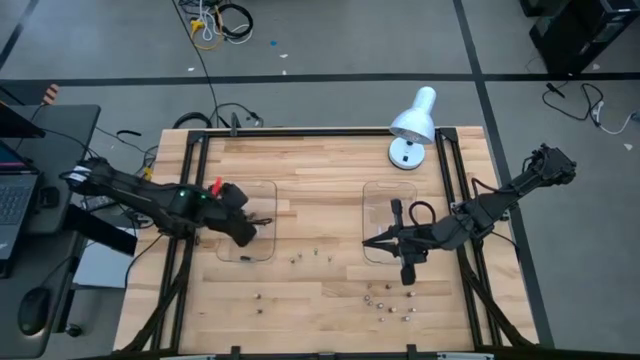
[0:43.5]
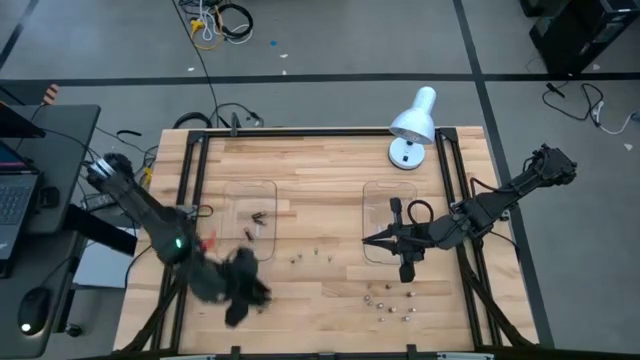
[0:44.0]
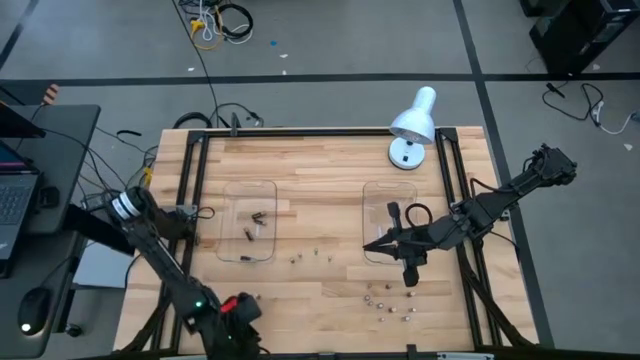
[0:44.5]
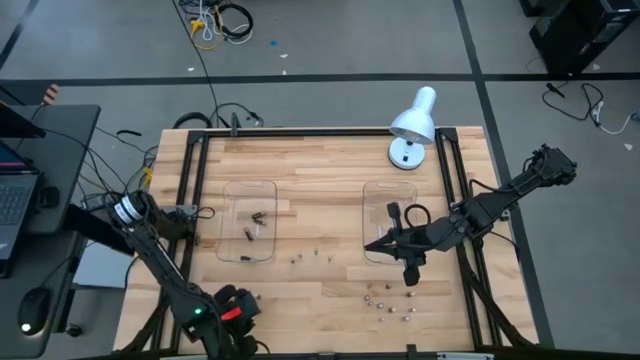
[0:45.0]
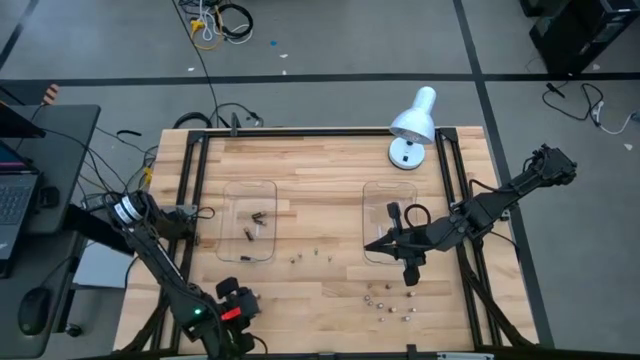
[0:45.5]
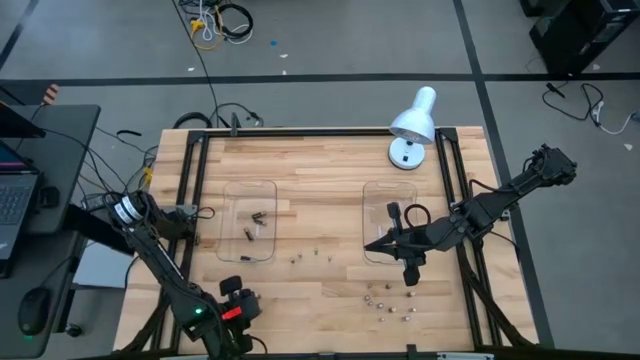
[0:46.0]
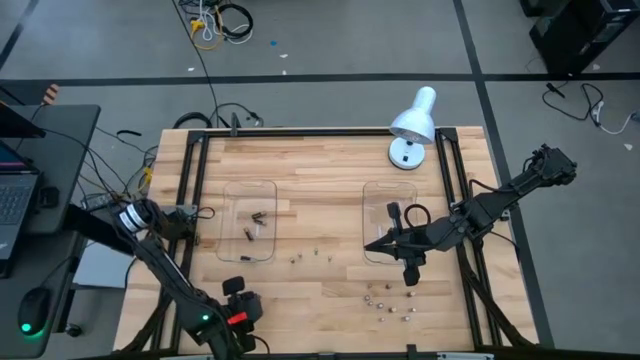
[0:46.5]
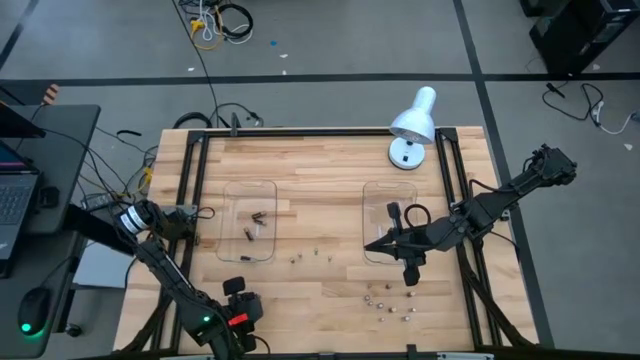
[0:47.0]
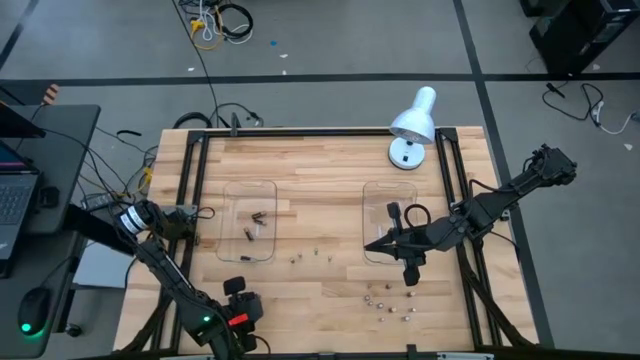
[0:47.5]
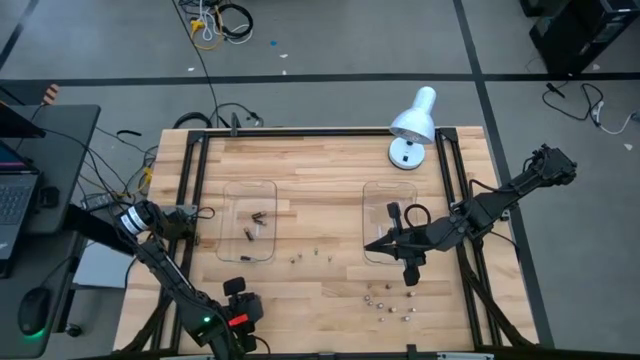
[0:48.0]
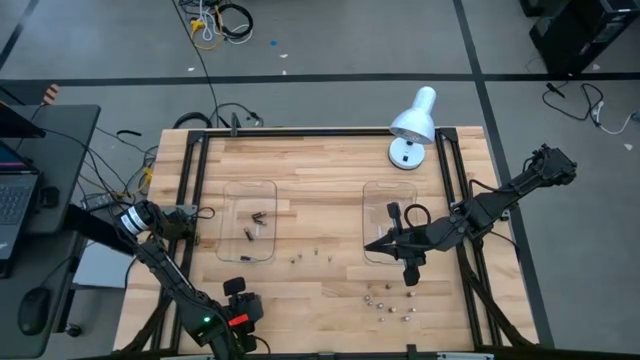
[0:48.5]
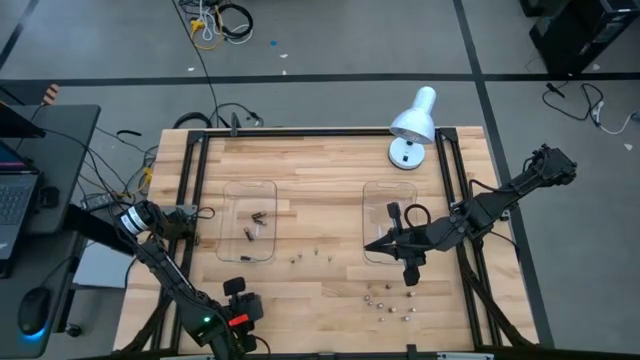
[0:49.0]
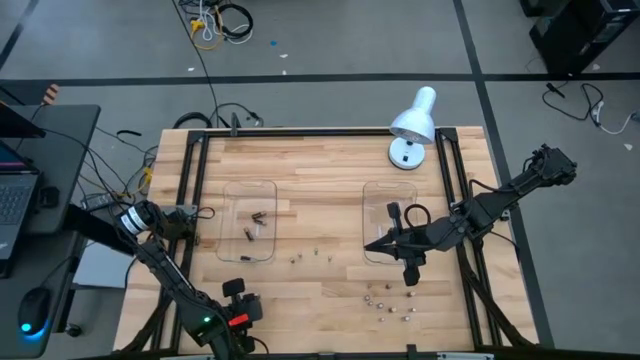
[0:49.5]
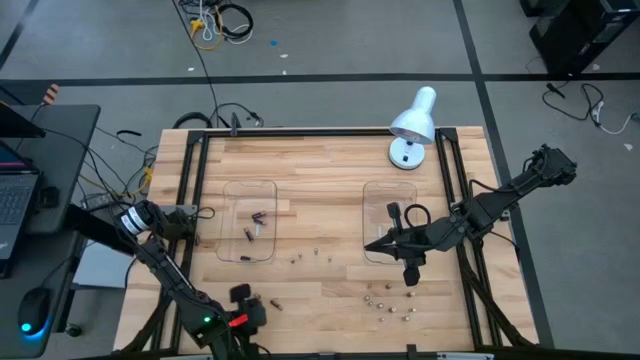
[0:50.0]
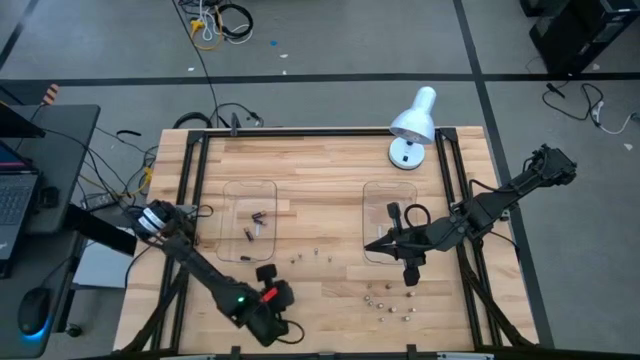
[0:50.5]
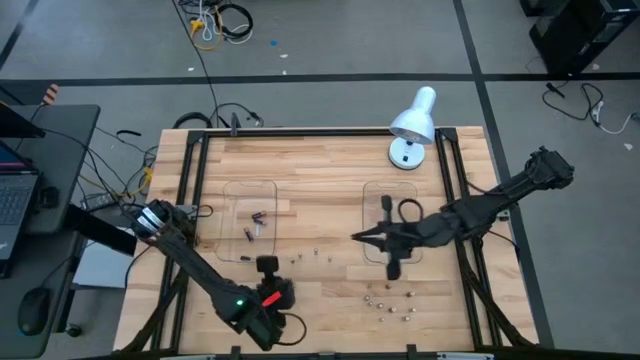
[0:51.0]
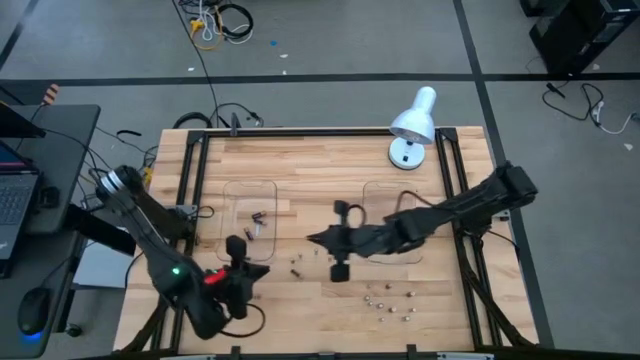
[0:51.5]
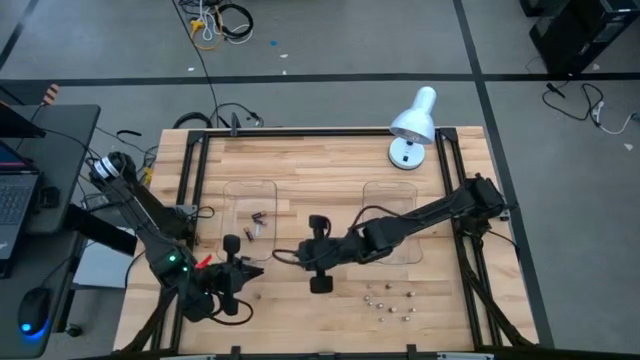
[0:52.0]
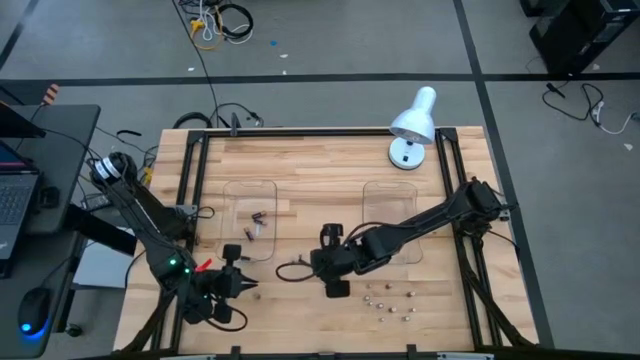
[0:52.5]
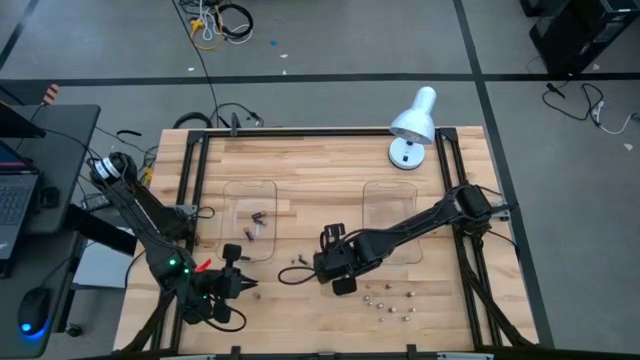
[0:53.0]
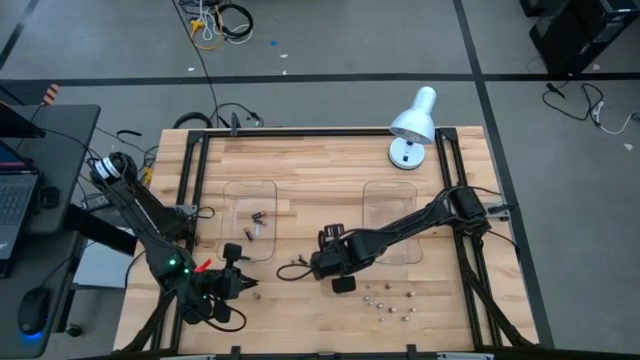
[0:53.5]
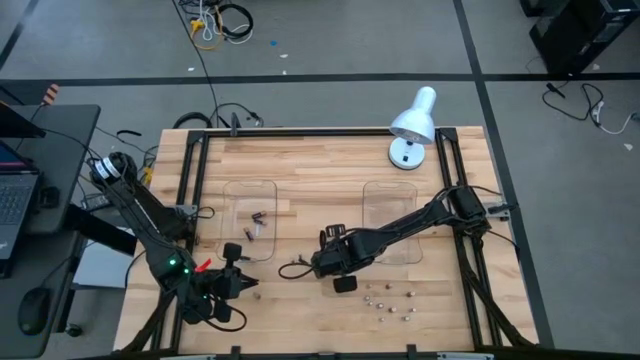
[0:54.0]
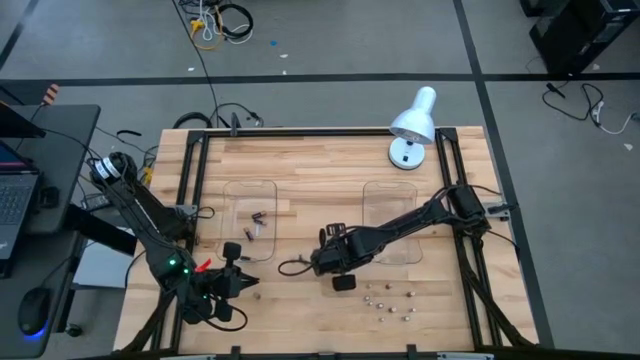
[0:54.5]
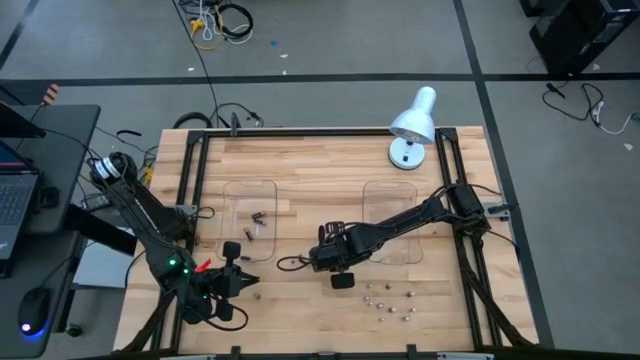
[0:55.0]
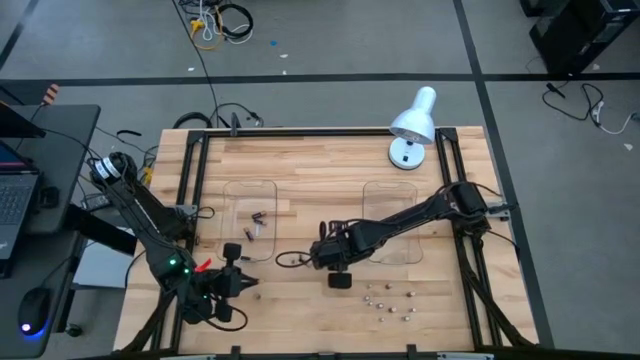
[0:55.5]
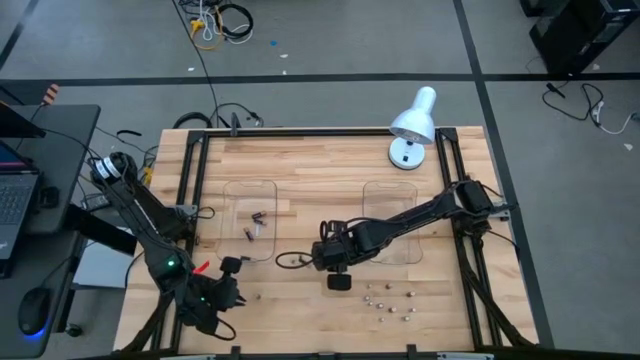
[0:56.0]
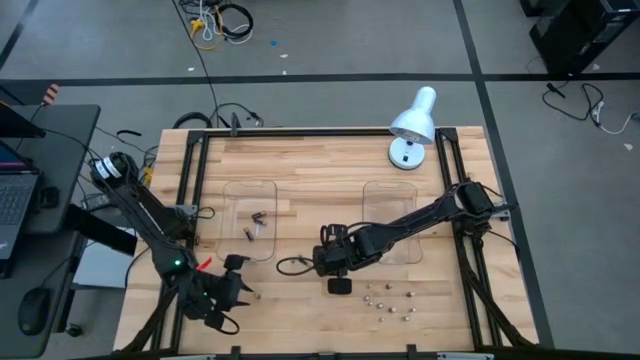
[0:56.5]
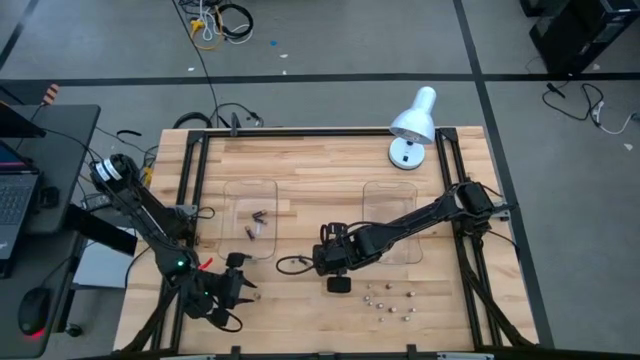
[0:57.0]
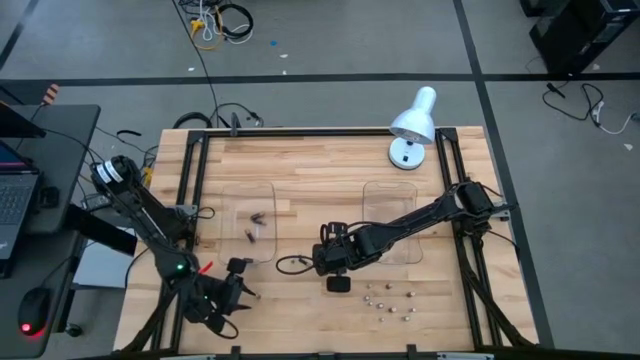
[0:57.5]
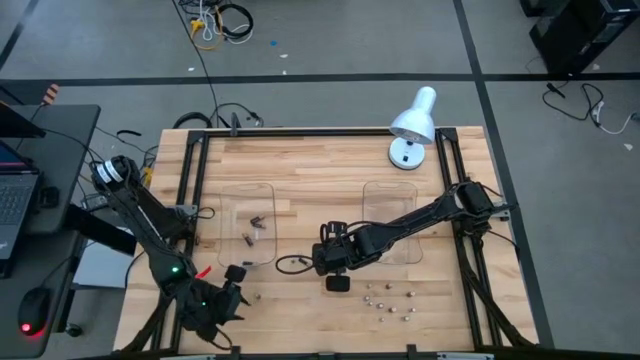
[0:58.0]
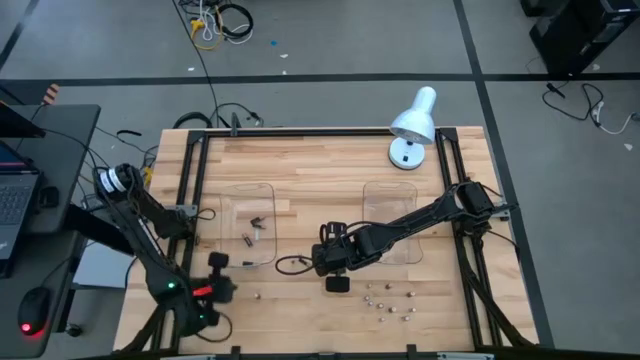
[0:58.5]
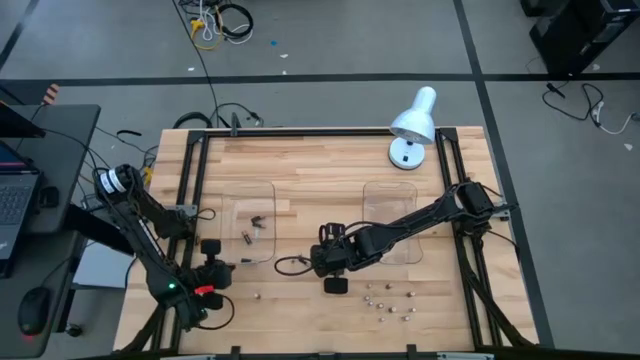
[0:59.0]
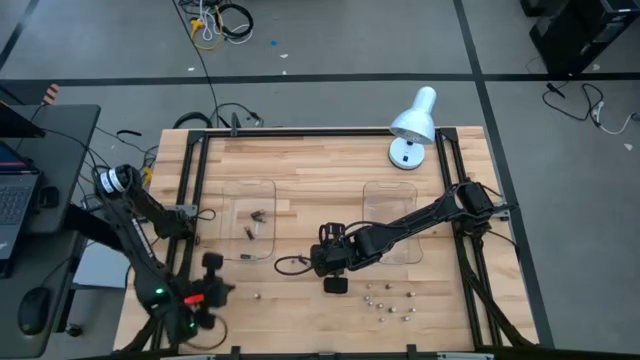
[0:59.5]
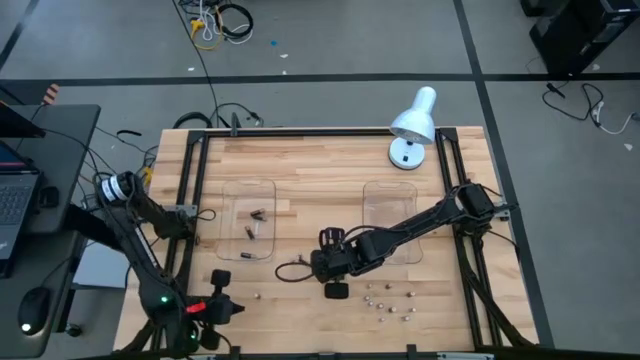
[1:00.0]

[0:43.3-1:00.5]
Task: Sort batteries
Put the black battery into the left transparent bin

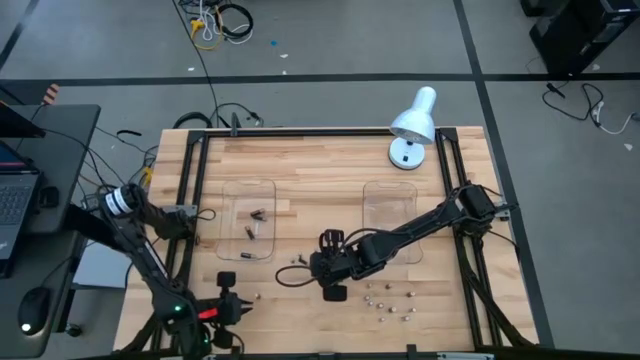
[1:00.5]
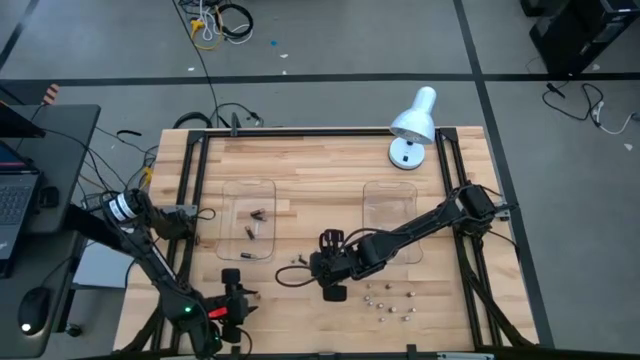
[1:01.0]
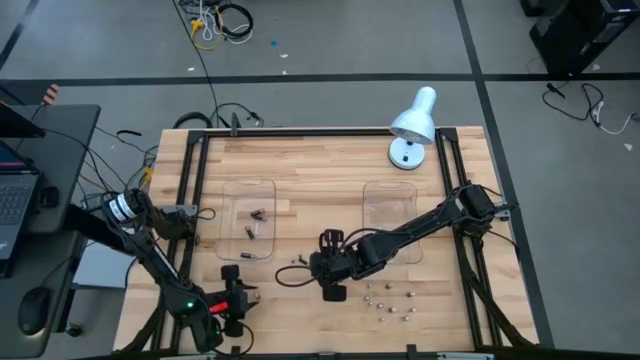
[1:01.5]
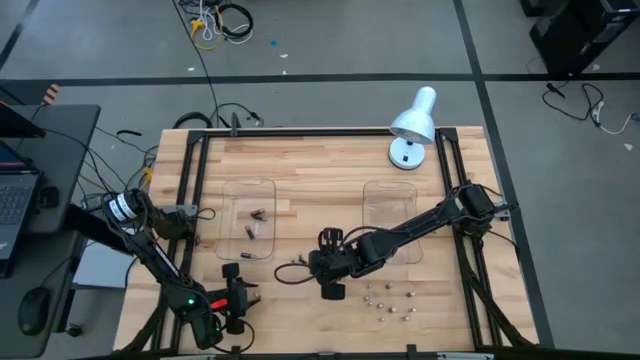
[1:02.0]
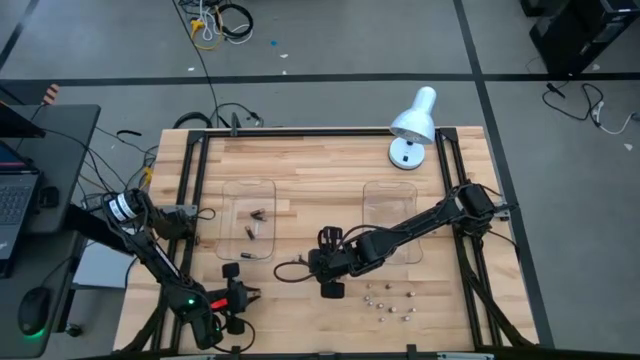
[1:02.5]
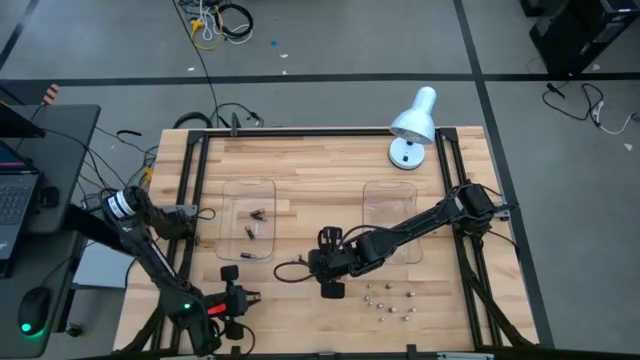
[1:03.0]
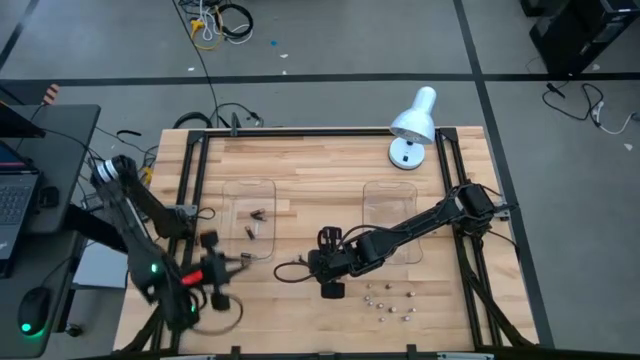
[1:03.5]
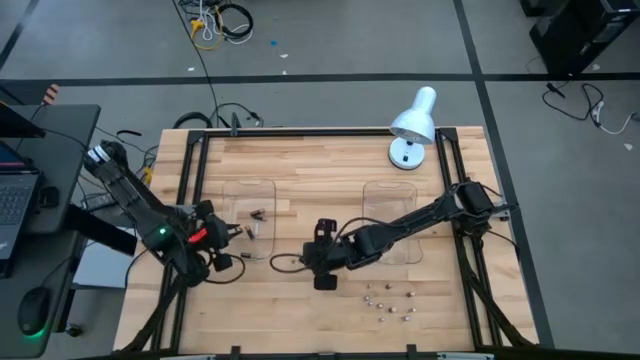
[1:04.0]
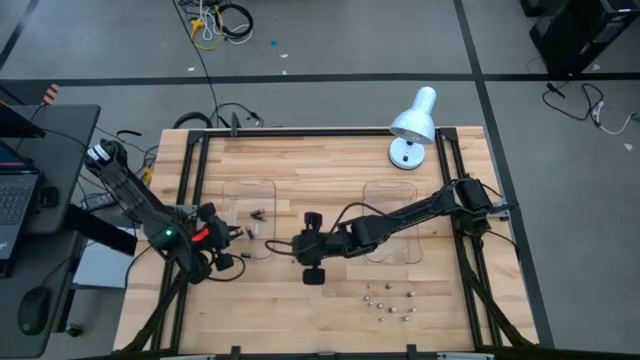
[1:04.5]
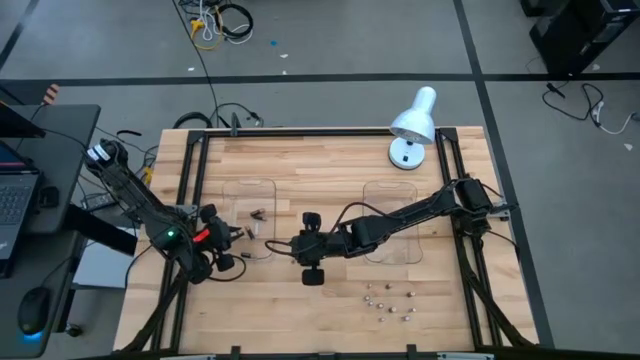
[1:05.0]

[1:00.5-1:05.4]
Put the black battery into the left transparent bin
